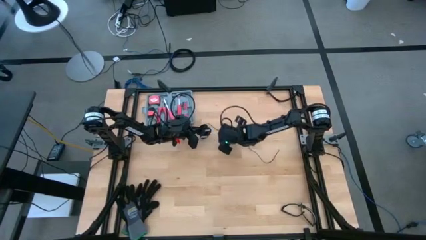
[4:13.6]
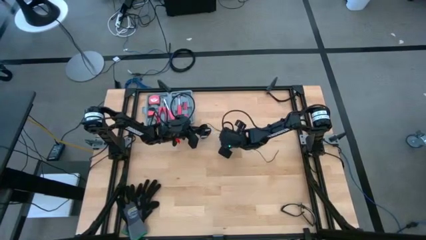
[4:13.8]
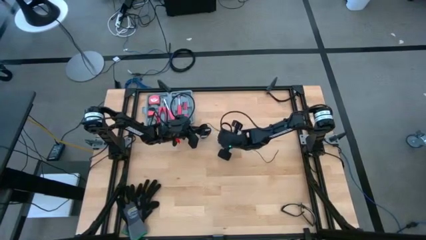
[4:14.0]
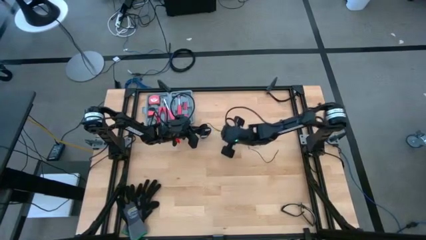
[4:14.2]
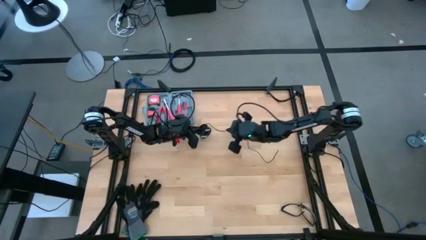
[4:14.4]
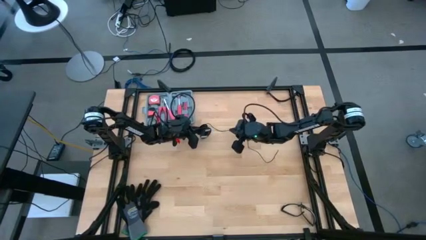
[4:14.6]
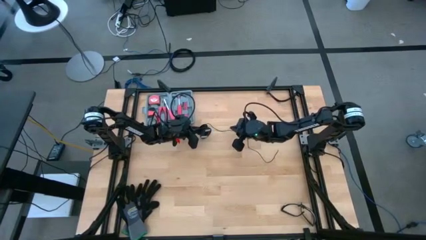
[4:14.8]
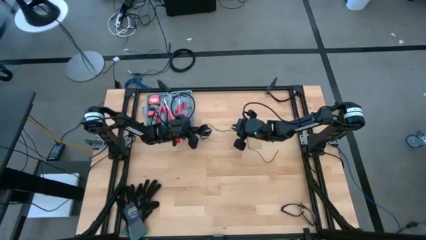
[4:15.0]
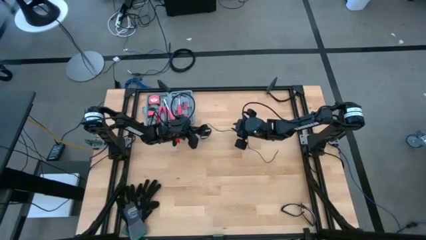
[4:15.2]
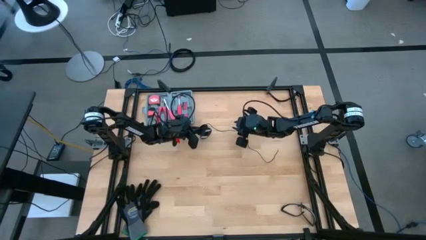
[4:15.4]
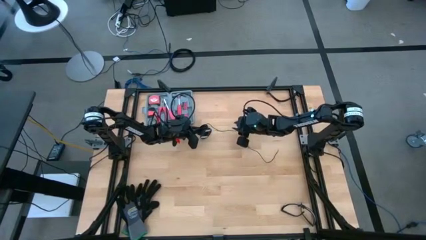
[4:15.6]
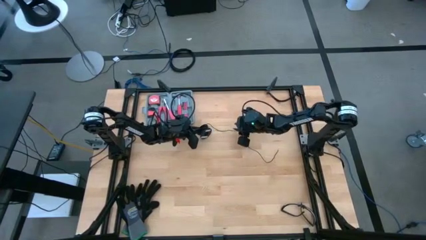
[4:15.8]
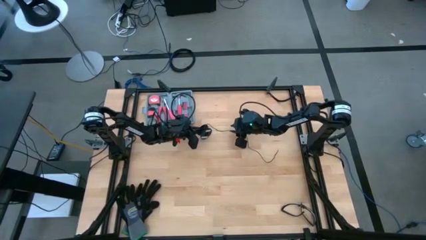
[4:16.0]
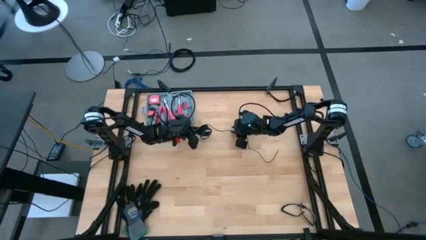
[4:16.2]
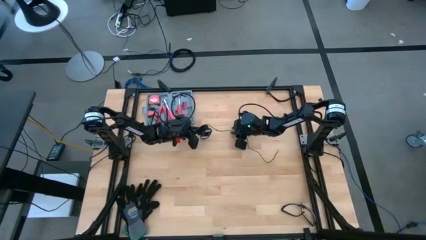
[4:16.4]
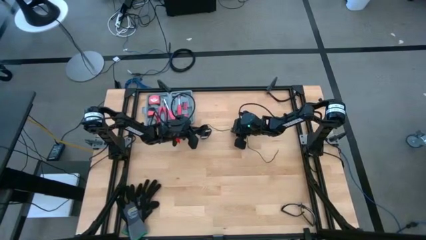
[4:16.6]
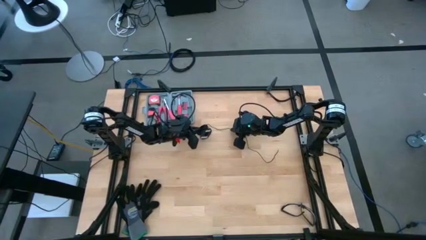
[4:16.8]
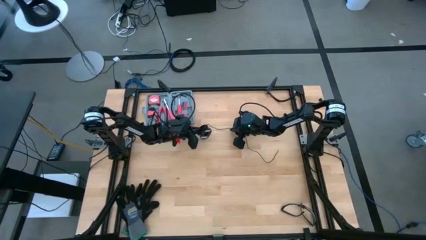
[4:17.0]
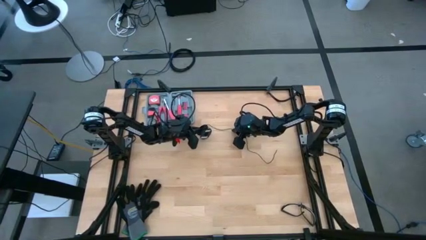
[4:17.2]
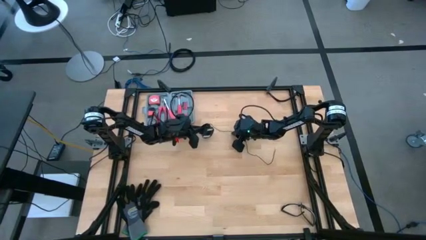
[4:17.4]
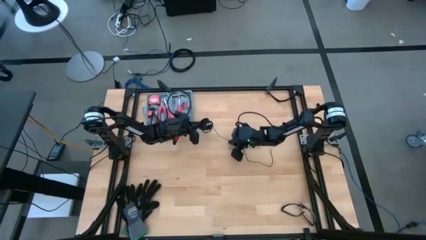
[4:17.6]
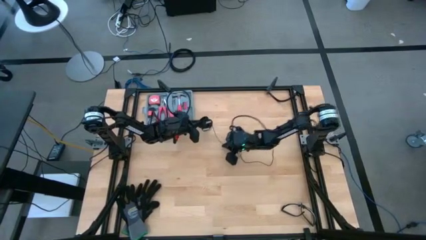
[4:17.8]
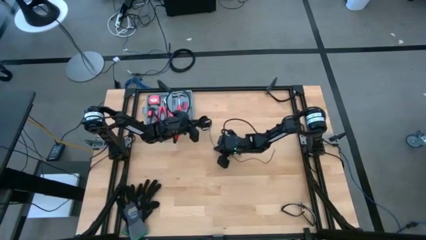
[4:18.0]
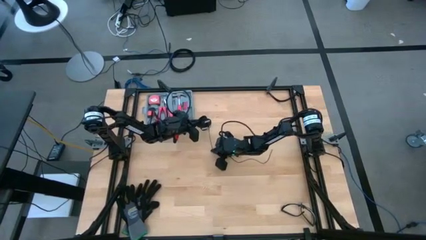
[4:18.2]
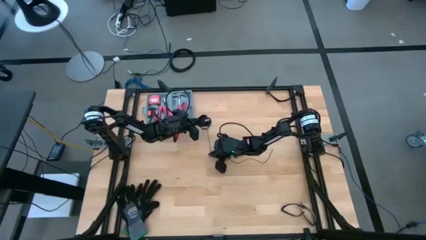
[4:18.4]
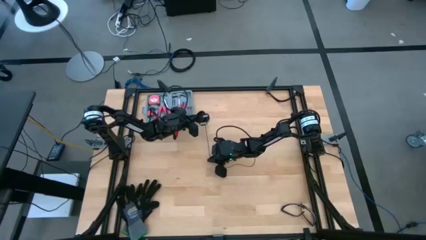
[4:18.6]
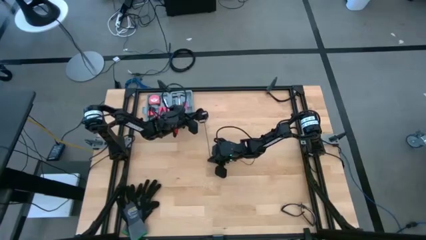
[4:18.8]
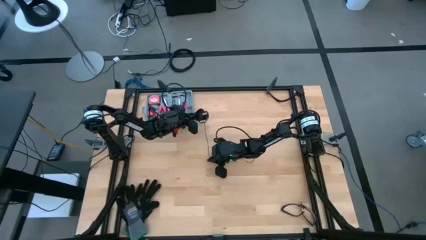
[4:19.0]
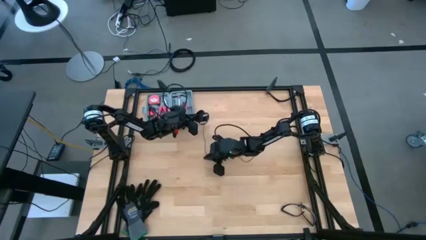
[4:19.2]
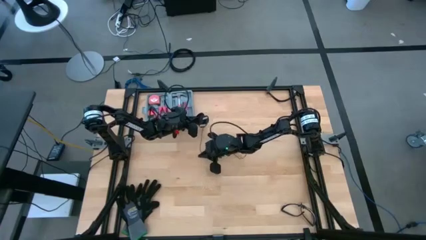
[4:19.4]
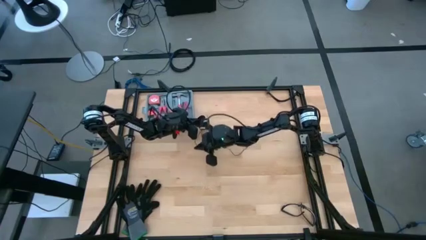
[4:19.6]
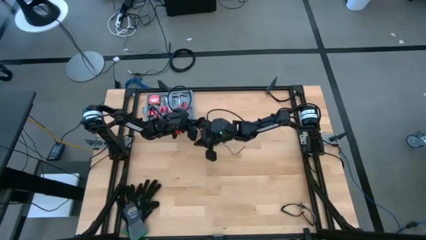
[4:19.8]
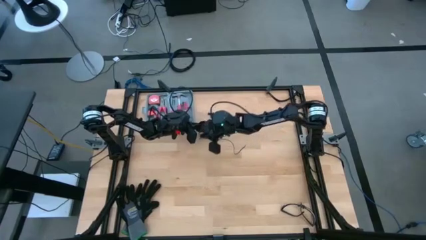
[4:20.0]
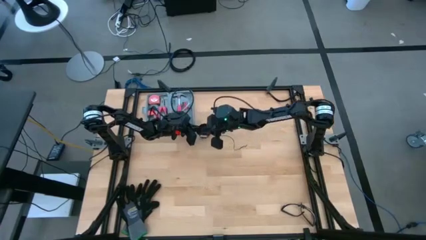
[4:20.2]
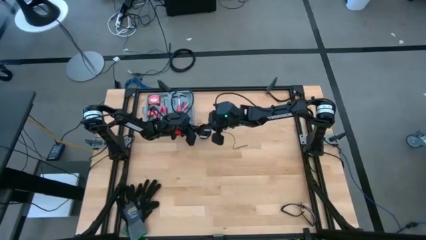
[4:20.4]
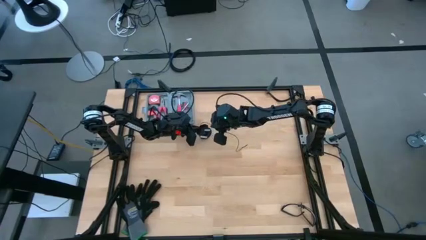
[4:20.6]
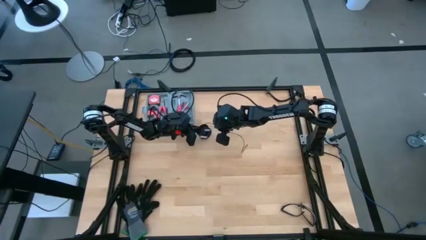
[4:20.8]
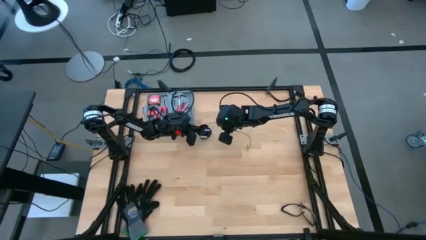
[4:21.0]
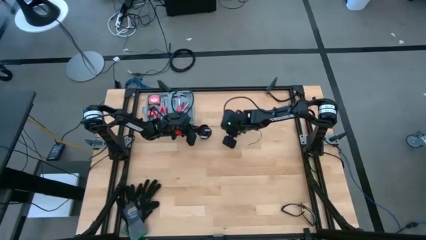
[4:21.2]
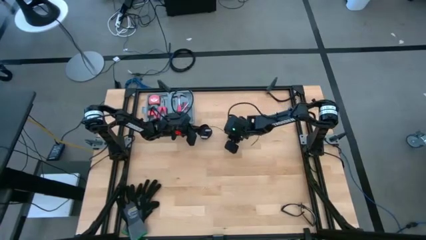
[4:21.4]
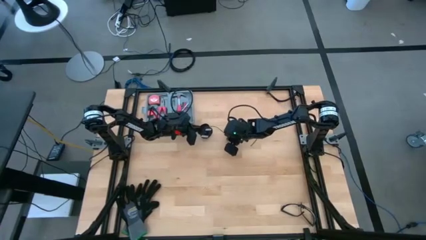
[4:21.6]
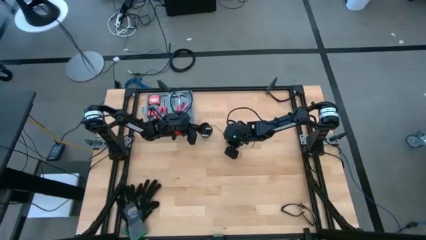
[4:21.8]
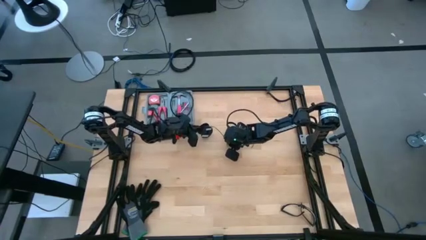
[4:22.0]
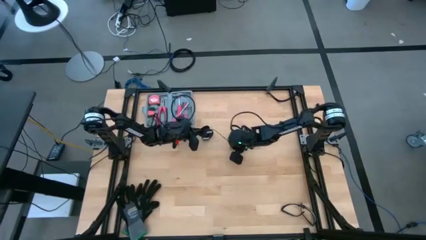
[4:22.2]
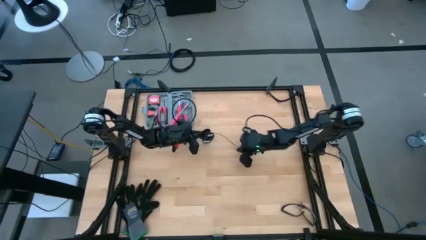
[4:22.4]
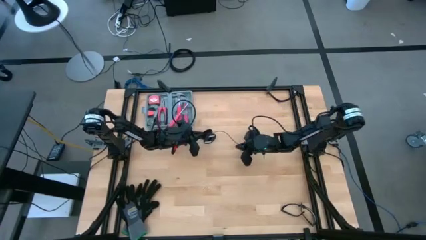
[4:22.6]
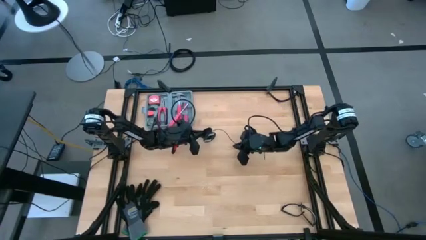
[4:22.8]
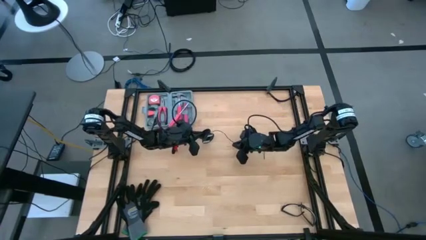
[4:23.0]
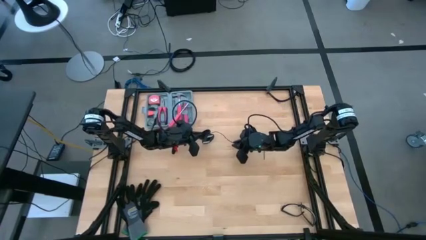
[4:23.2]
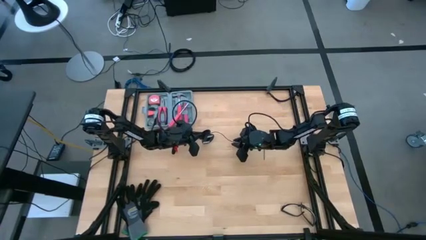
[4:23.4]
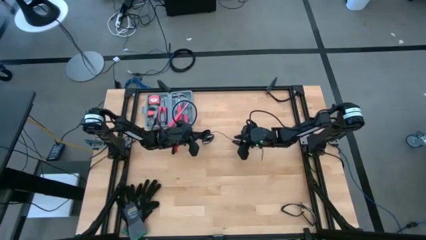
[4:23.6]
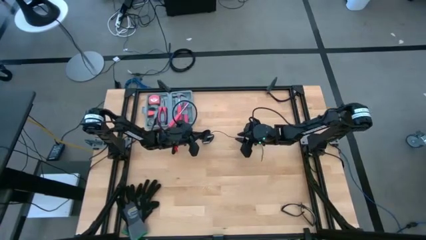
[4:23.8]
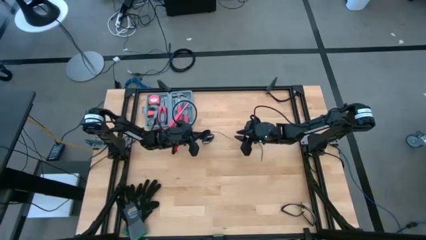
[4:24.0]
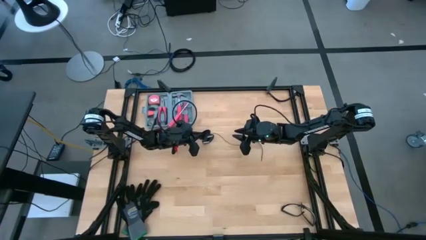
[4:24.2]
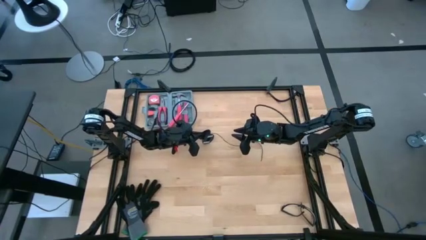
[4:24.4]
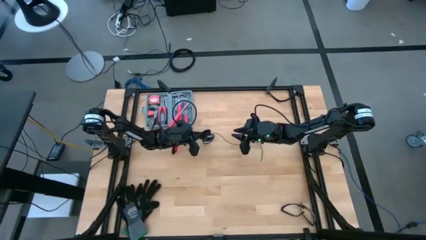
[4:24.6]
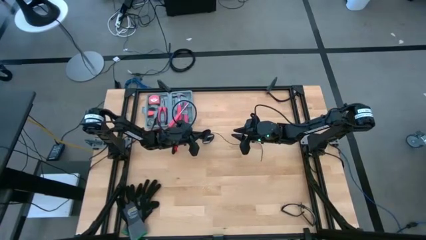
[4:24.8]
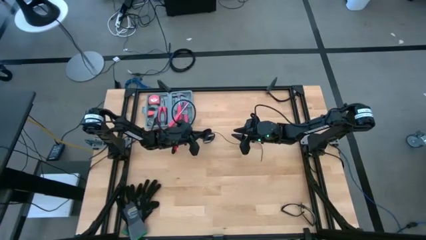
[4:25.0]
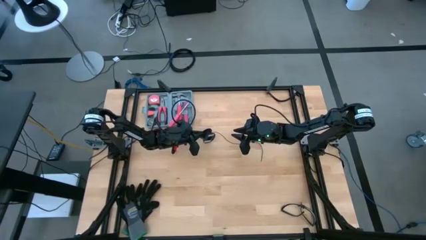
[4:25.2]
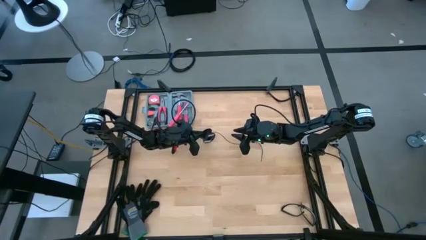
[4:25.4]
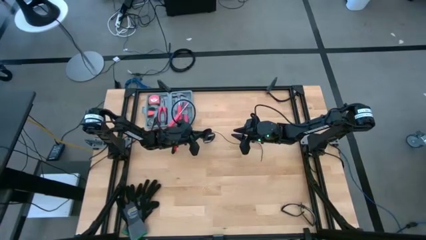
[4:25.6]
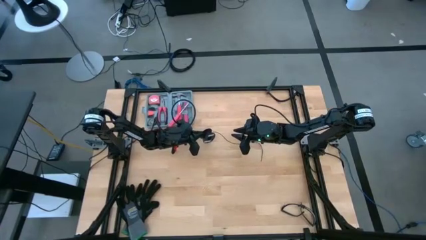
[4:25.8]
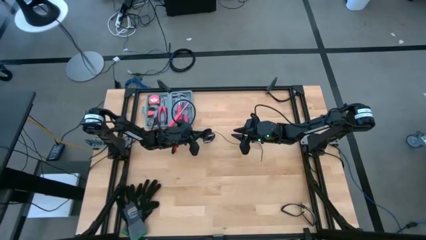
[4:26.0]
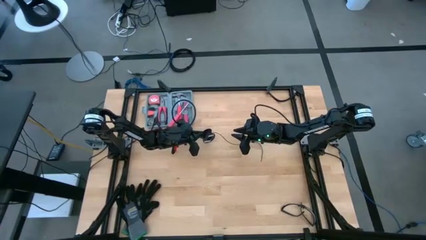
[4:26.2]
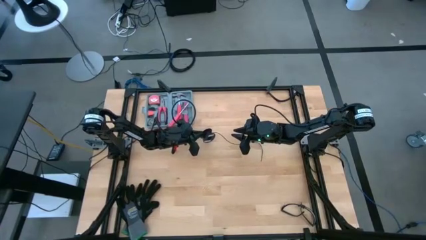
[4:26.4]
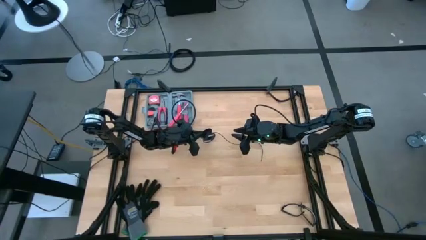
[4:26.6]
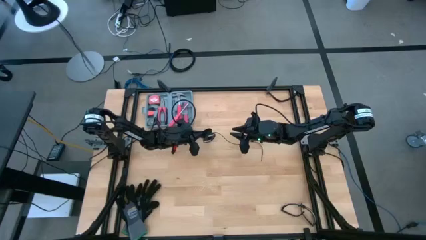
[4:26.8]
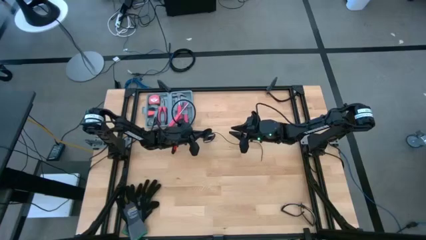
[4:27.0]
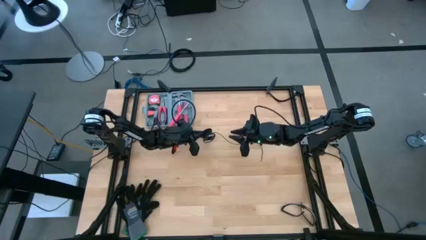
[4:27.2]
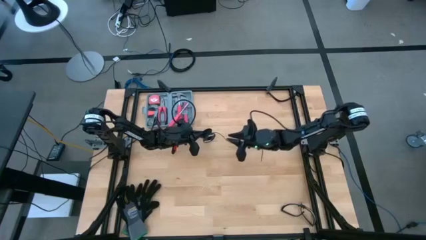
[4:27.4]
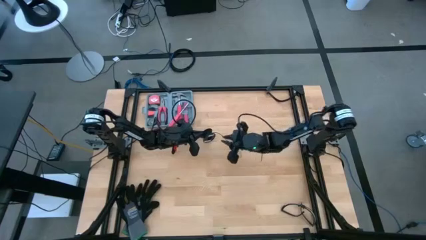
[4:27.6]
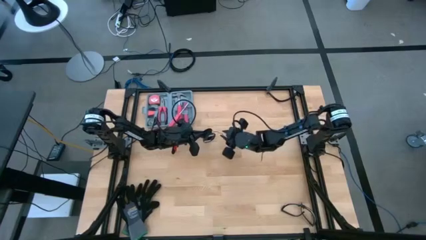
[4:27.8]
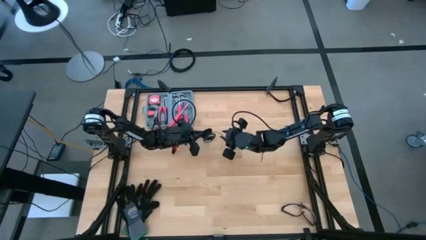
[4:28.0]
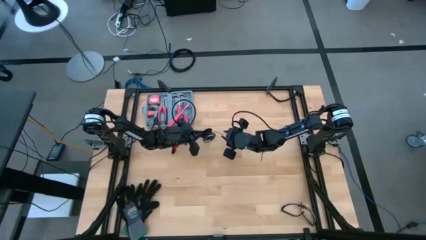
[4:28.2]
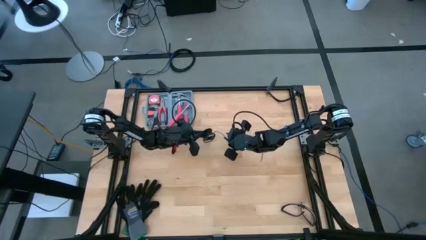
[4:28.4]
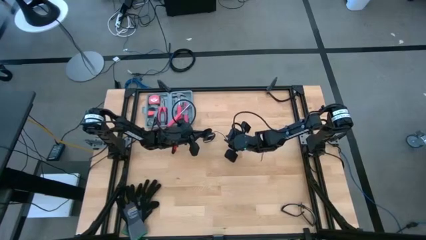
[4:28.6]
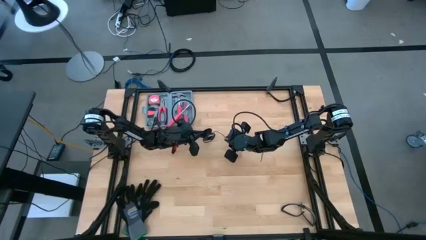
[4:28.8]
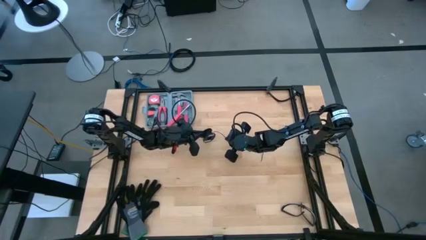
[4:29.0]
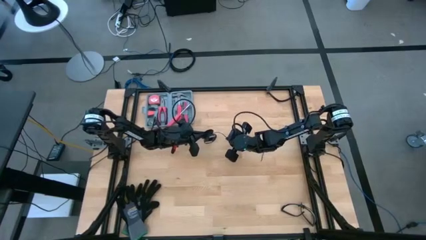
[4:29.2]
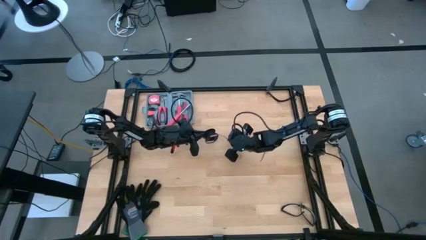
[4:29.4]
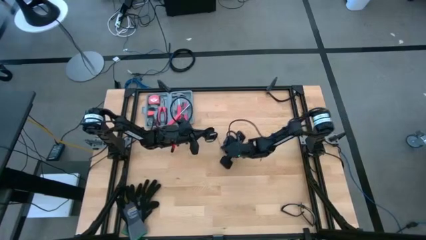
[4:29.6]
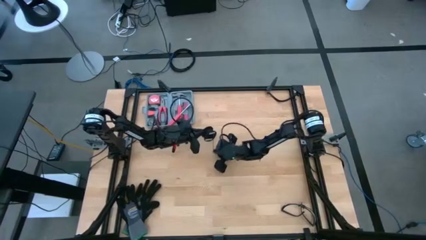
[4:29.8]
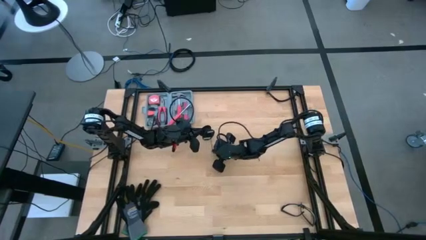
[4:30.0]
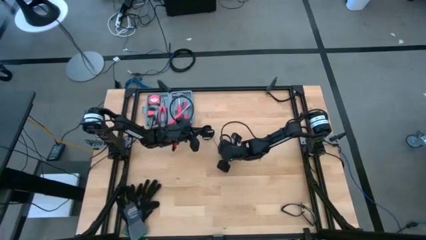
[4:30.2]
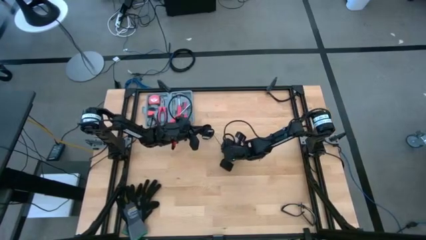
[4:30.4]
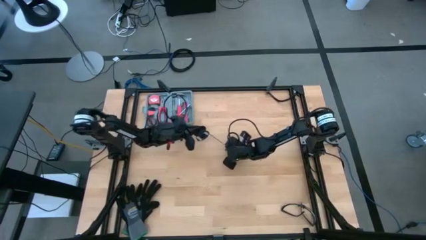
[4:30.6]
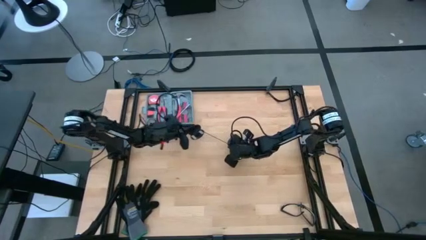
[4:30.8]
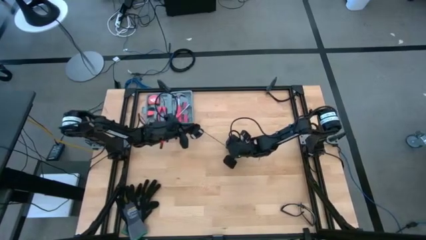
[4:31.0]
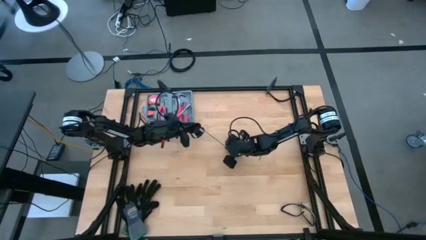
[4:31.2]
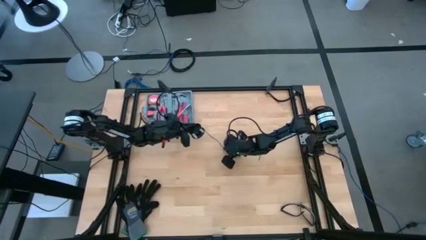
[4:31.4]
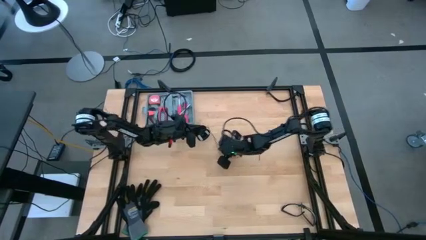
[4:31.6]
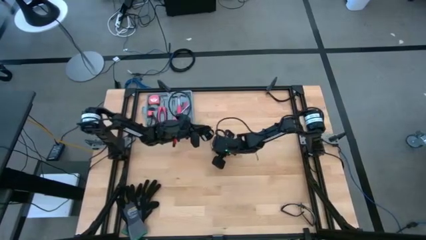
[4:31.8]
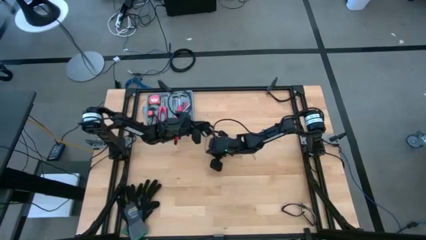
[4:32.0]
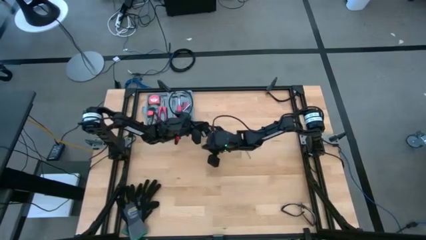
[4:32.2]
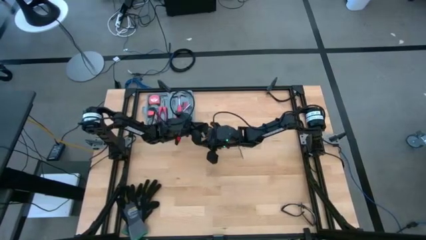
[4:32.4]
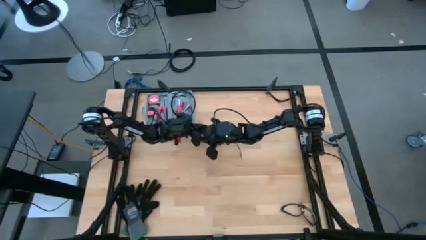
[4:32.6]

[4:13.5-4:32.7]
Task: Coil cords
Coil the black wire onto the spool
